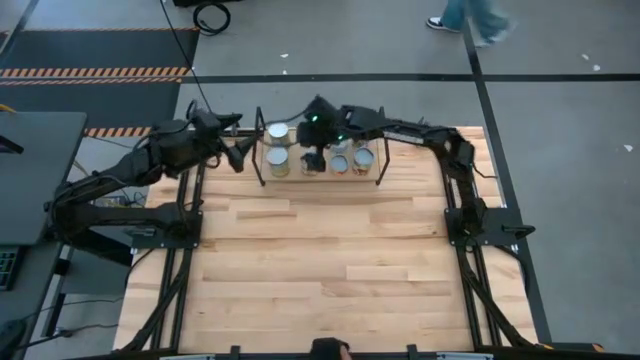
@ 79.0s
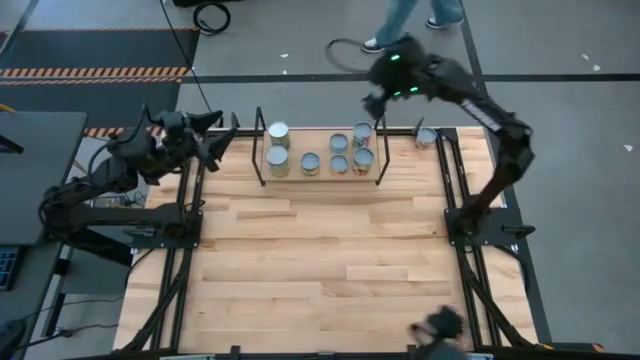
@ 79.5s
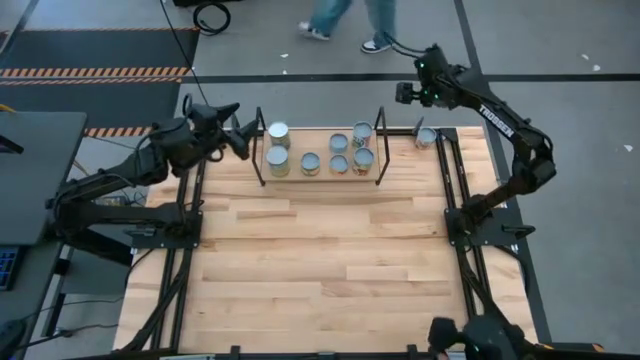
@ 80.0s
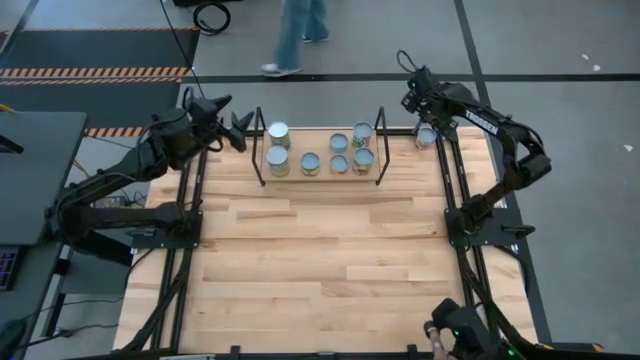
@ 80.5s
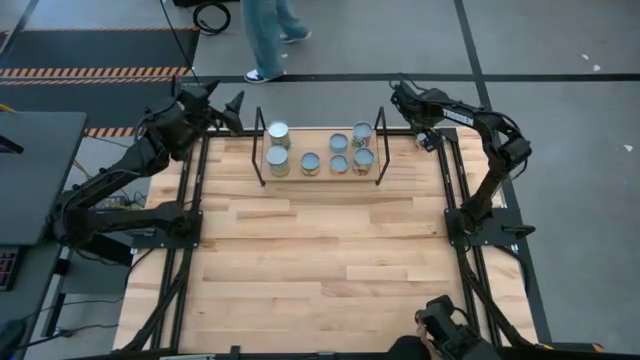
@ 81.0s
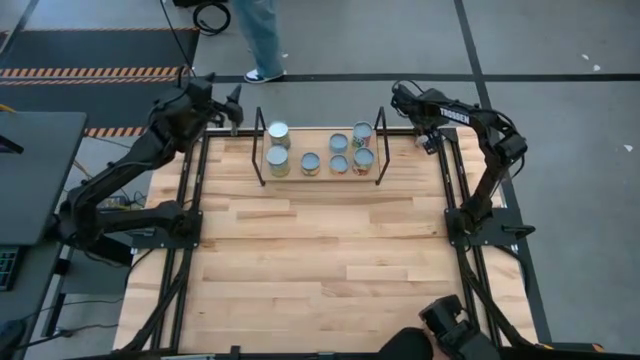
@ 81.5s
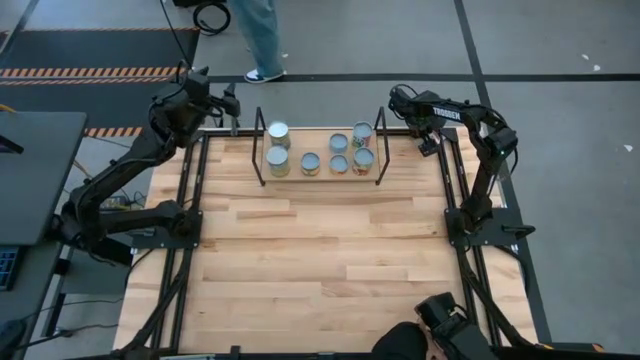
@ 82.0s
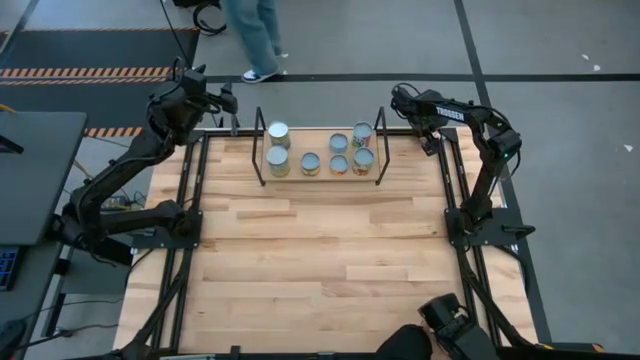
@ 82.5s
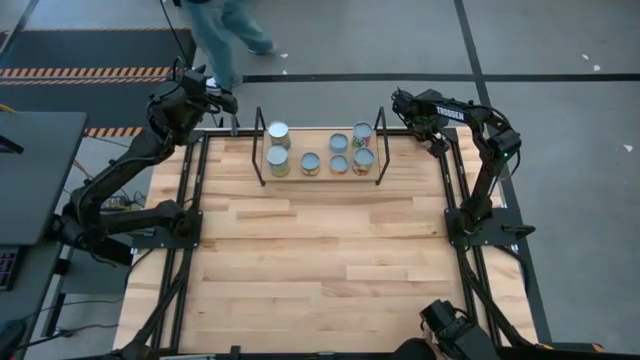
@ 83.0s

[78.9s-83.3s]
Task: Pick and place cans onto a shelf
Put the red can on the shelf

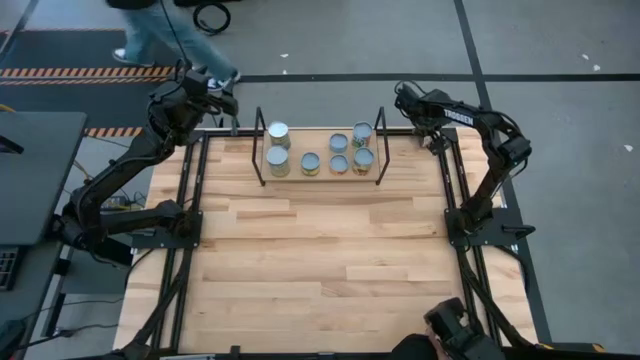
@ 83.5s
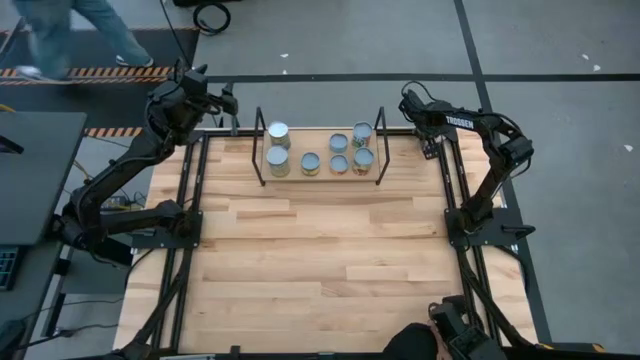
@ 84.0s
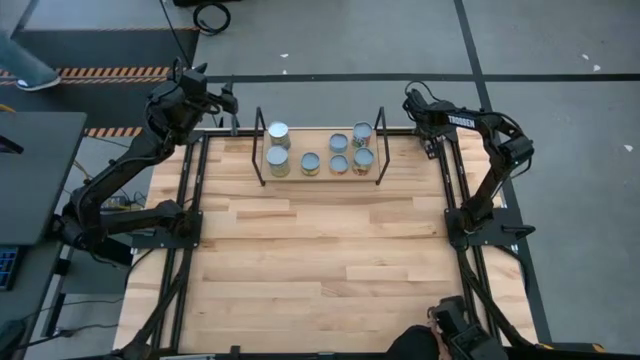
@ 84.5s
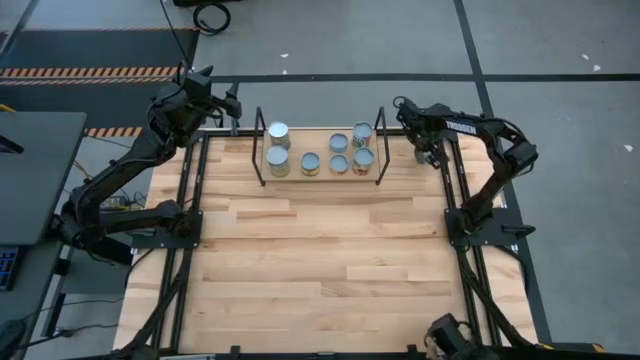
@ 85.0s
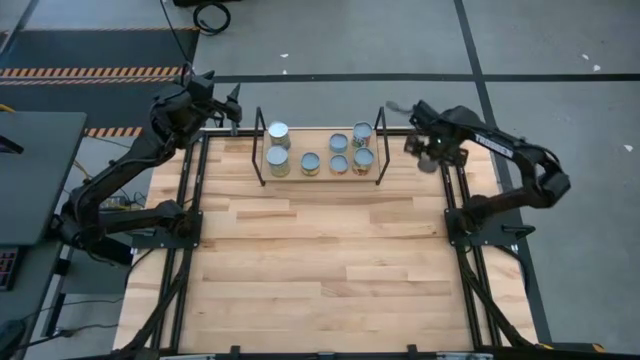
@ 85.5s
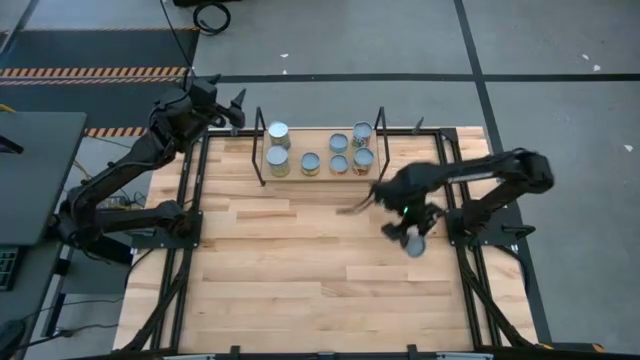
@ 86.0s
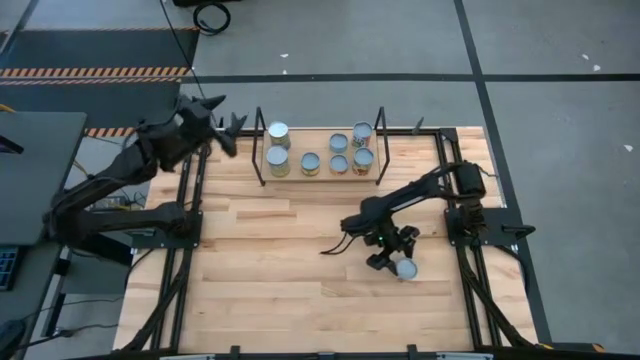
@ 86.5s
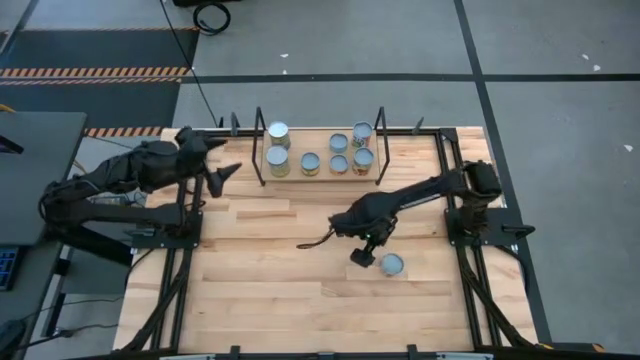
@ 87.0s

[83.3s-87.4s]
Move the red can to the bottom right of the table

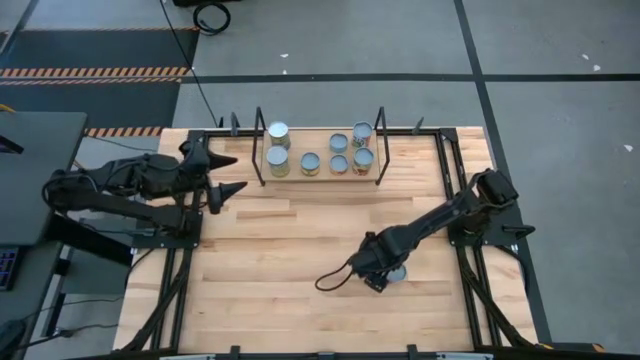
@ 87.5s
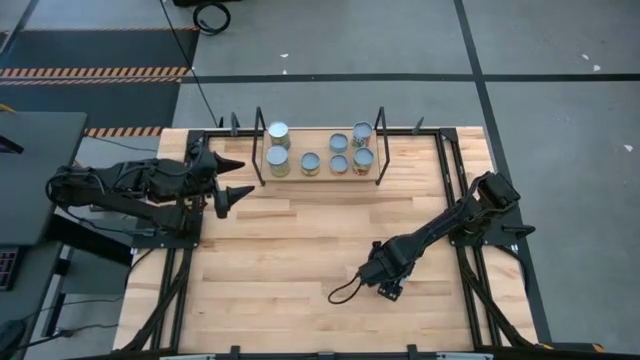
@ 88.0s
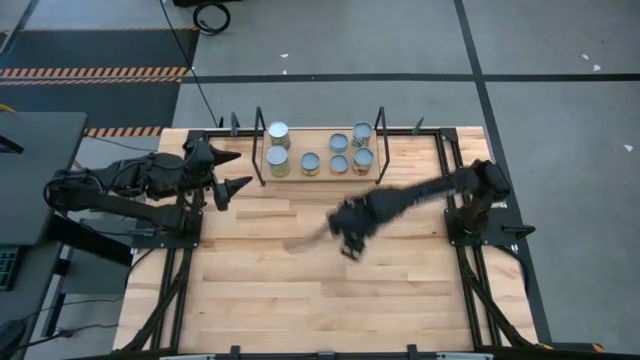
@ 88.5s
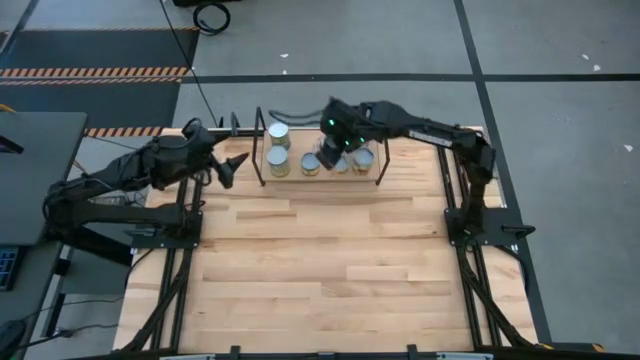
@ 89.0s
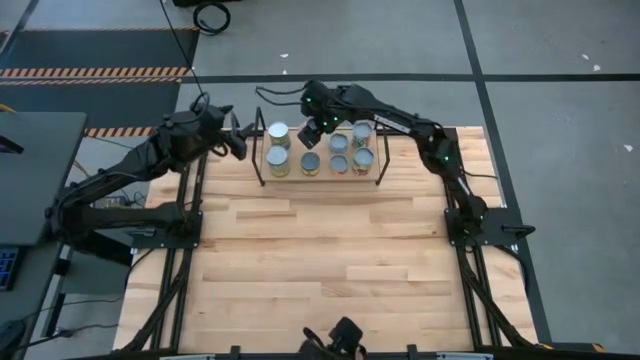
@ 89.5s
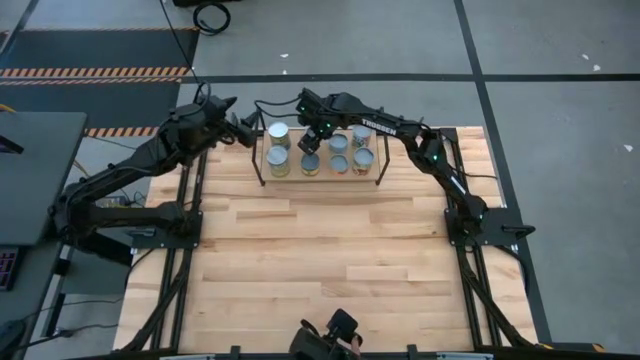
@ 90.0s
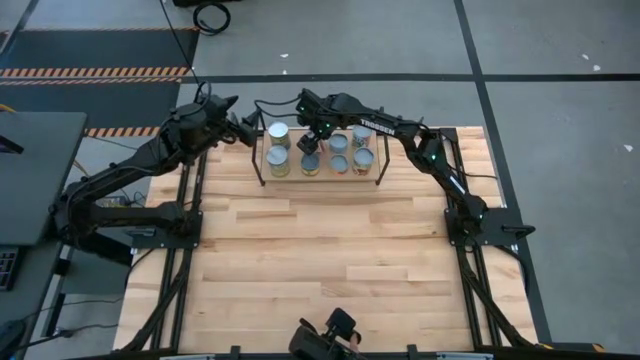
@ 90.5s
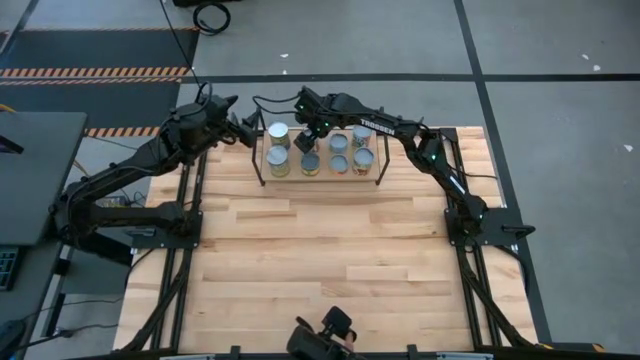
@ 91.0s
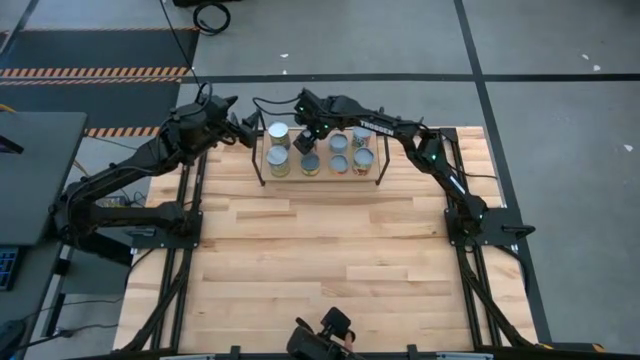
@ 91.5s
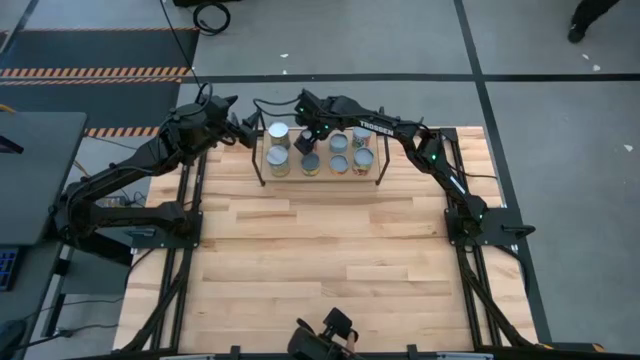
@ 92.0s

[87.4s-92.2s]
Put the red can on the shelf aligned with the orange can

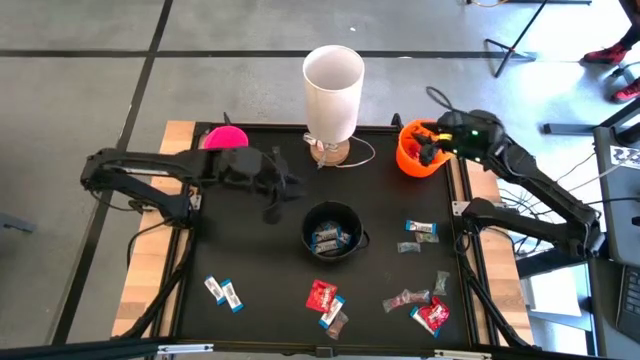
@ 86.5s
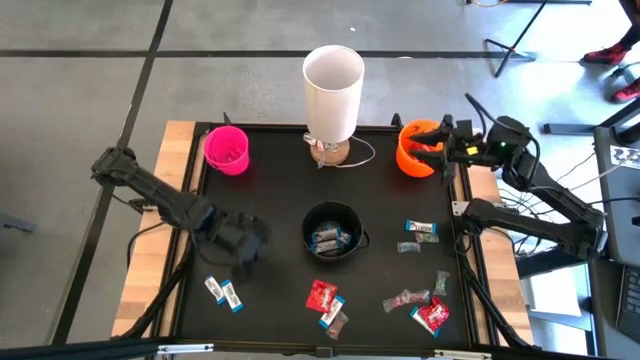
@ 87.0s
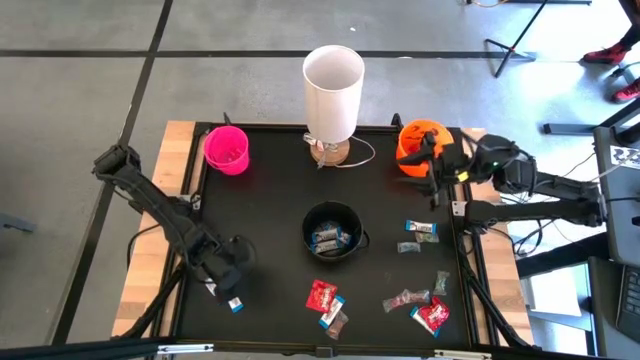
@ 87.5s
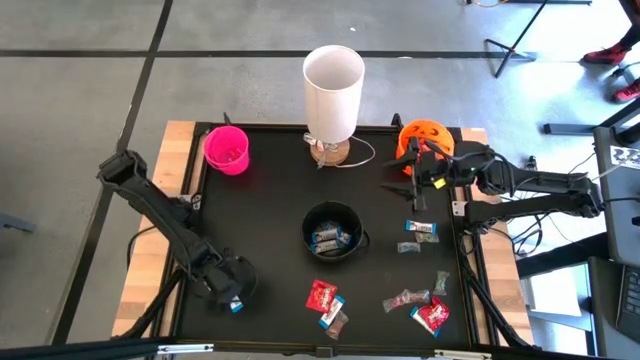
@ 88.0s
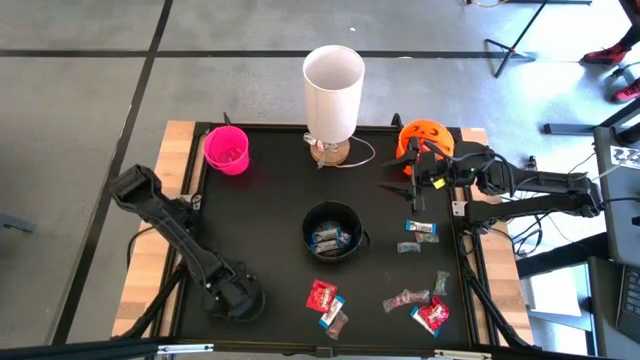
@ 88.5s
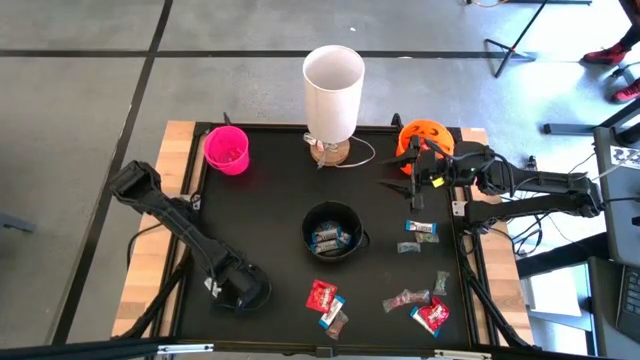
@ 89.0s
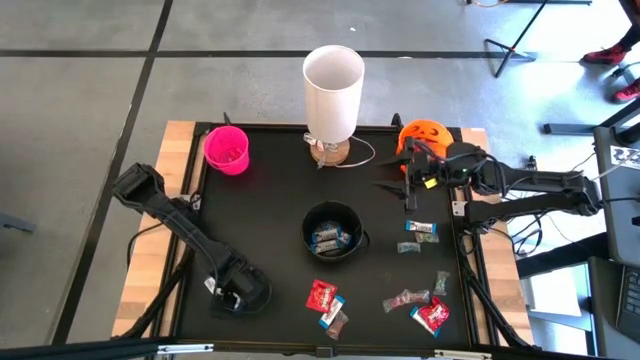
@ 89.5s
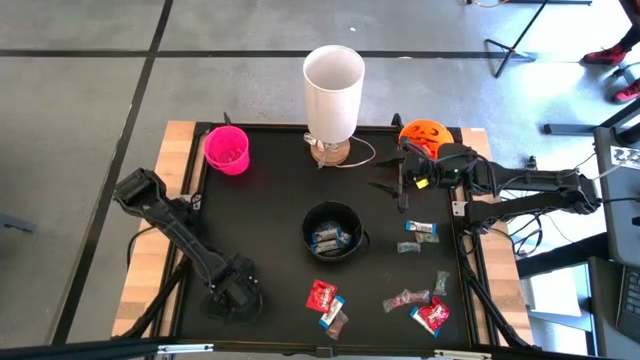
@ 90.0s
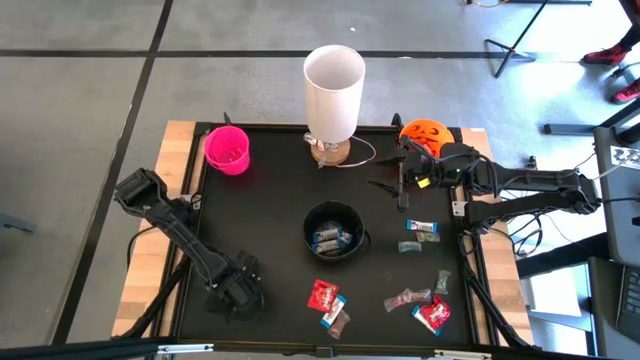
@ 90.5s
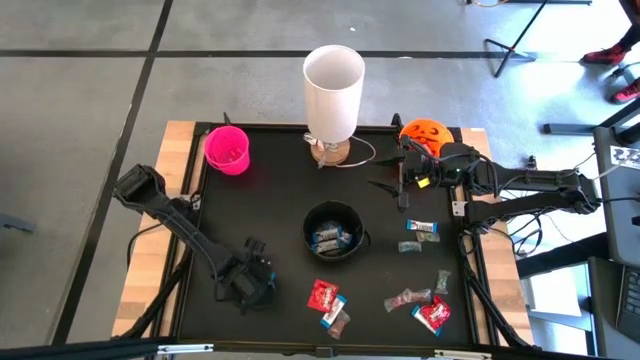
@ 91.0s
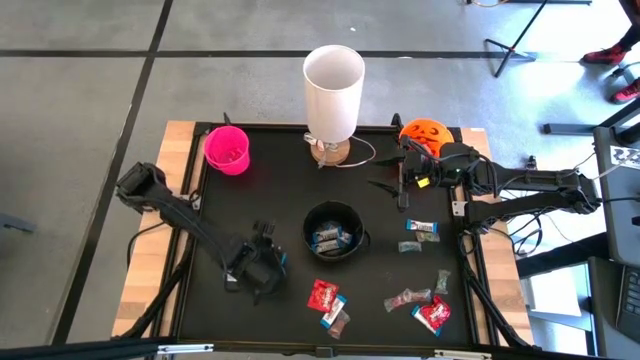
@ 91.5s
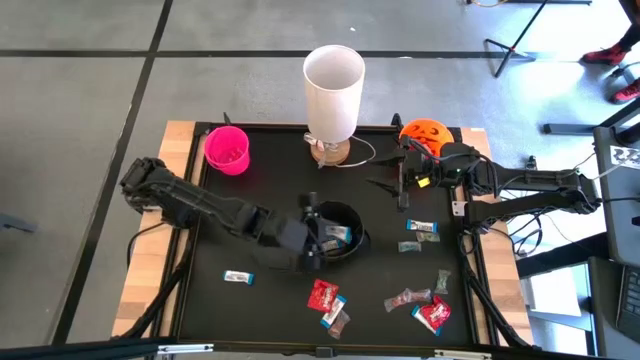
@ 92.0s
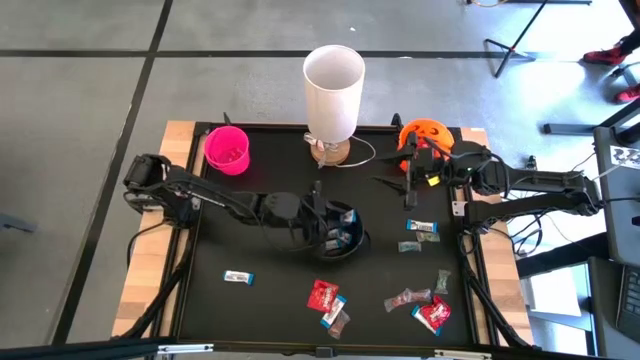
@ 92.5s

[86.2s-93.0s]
Task: Sort candy
Put the white chocolate into the black bucket
